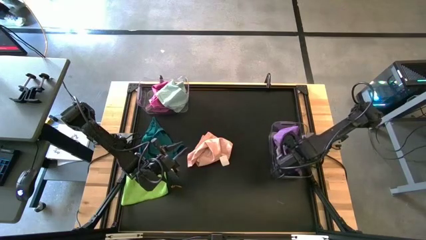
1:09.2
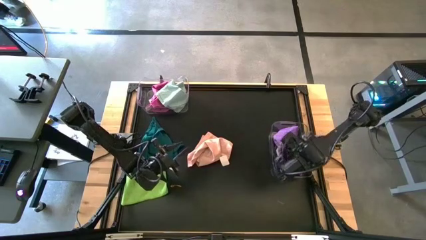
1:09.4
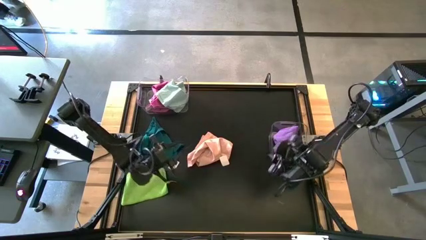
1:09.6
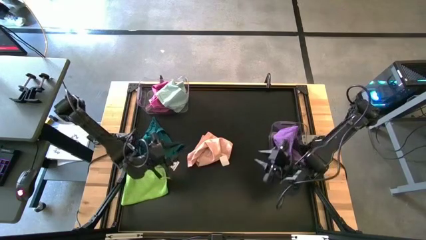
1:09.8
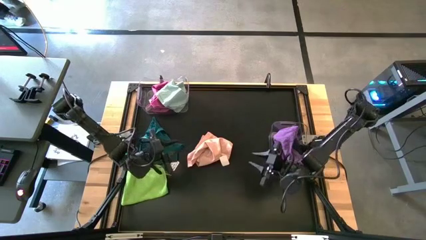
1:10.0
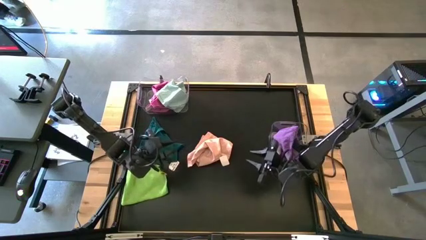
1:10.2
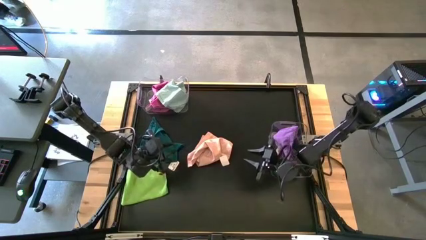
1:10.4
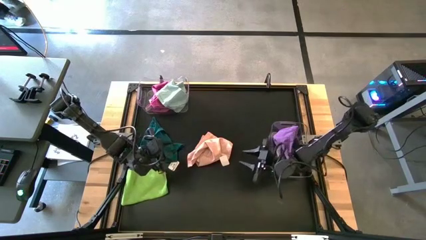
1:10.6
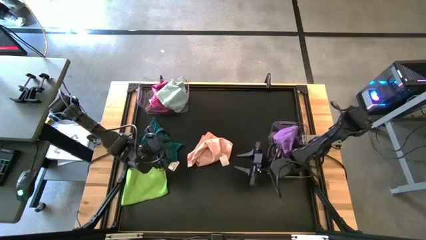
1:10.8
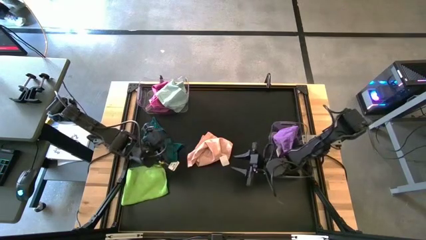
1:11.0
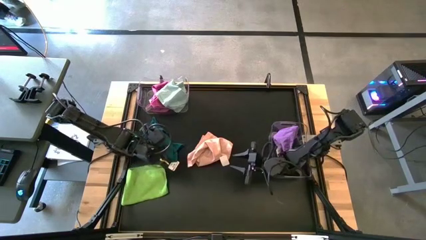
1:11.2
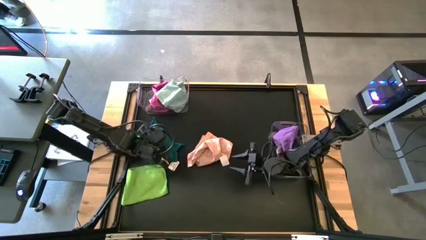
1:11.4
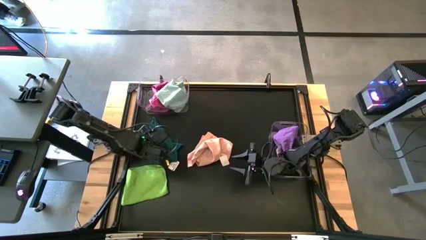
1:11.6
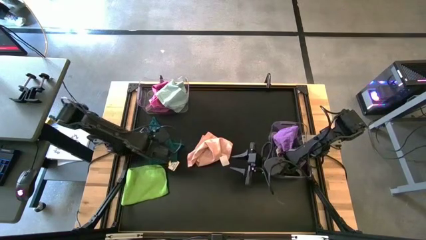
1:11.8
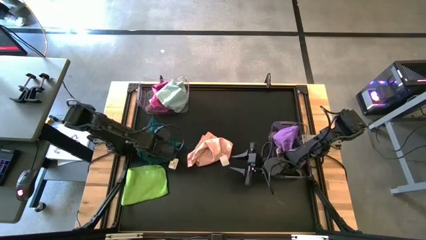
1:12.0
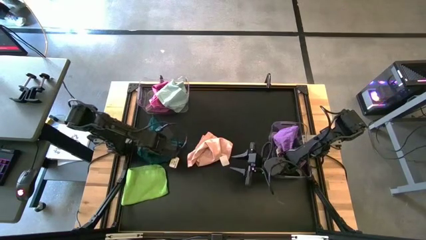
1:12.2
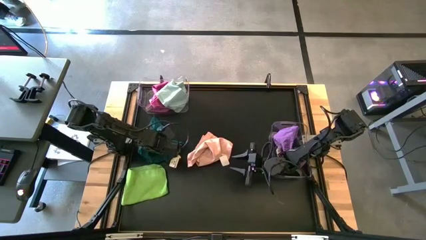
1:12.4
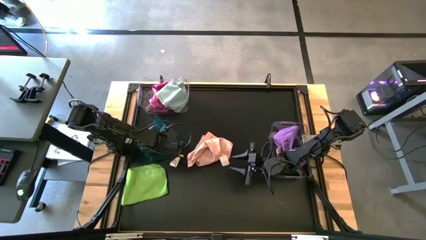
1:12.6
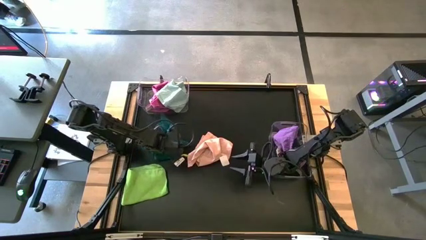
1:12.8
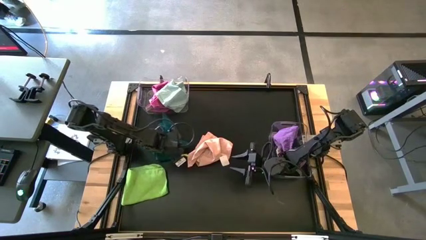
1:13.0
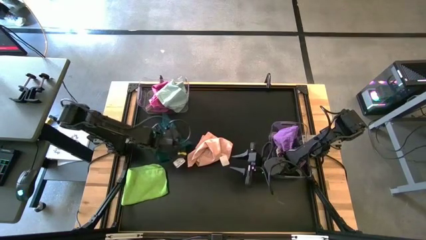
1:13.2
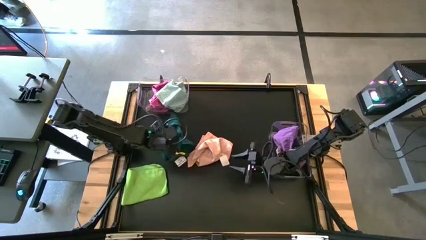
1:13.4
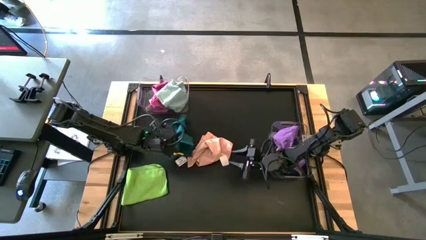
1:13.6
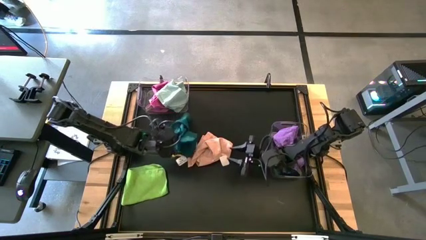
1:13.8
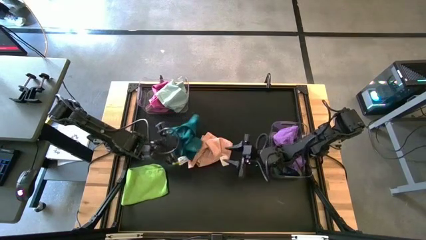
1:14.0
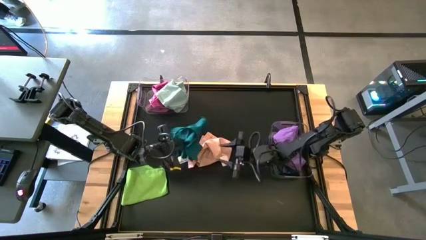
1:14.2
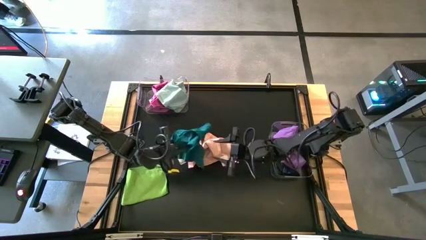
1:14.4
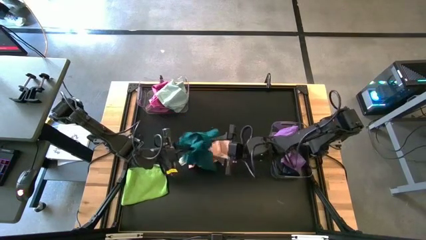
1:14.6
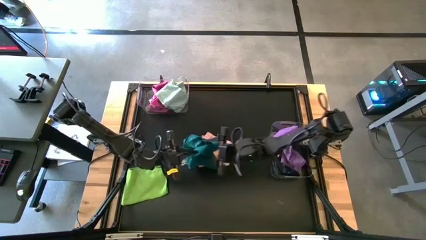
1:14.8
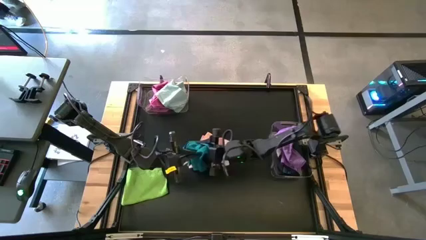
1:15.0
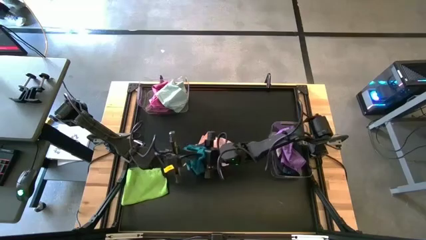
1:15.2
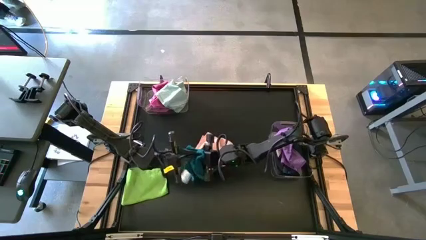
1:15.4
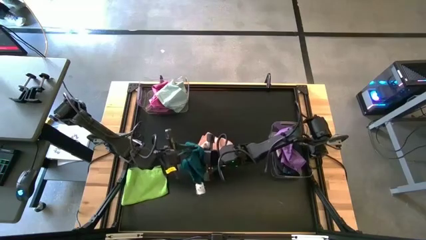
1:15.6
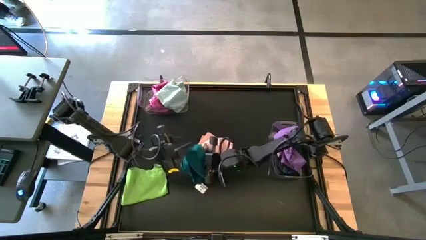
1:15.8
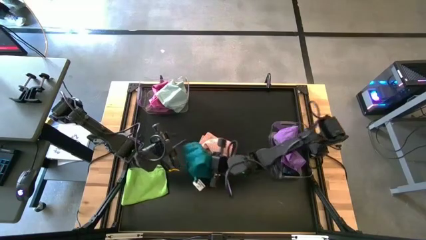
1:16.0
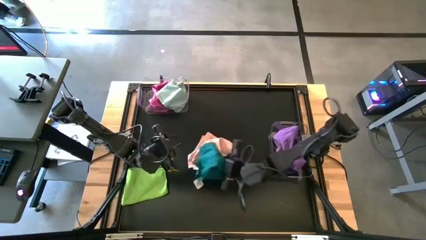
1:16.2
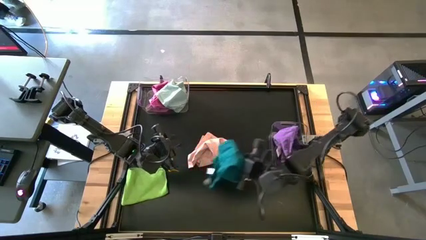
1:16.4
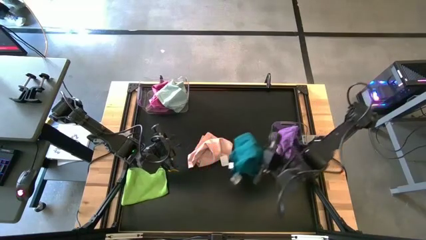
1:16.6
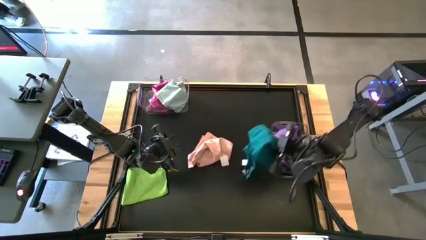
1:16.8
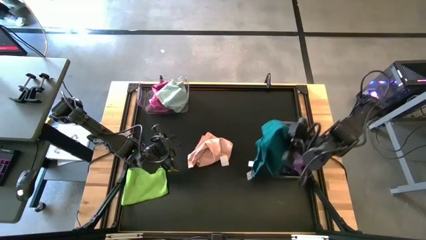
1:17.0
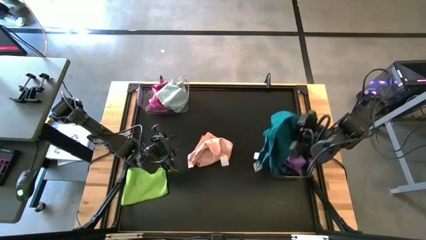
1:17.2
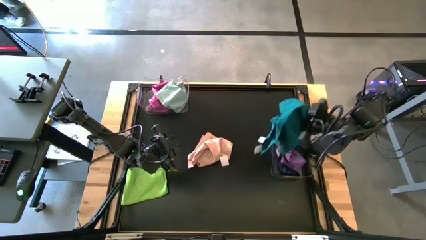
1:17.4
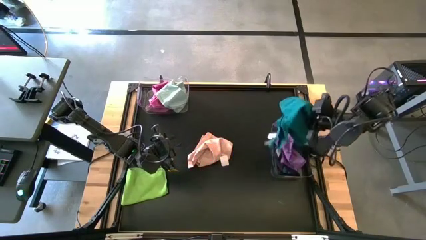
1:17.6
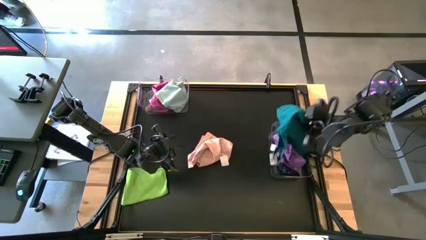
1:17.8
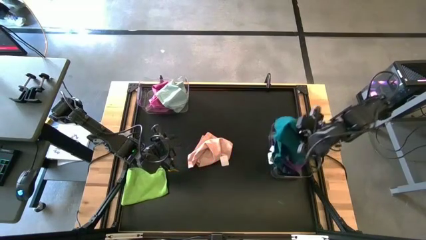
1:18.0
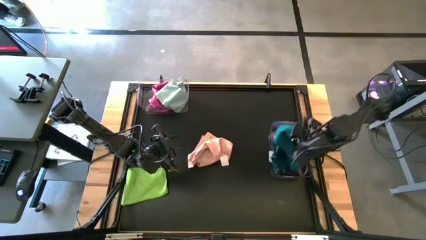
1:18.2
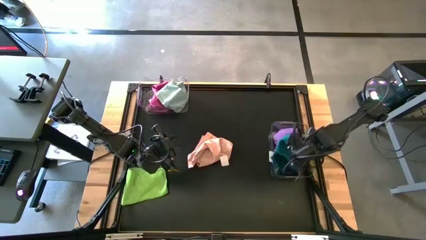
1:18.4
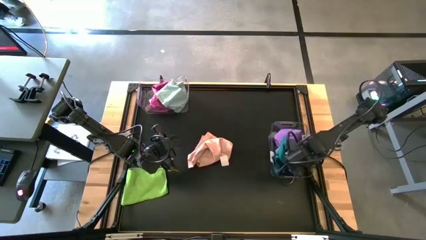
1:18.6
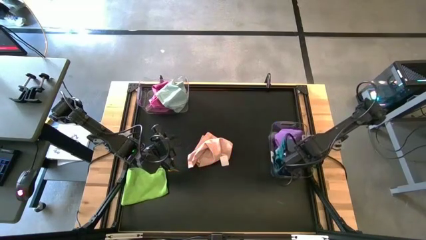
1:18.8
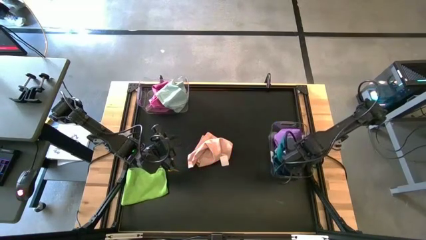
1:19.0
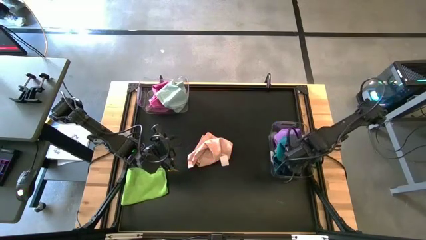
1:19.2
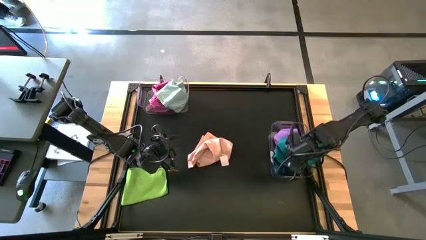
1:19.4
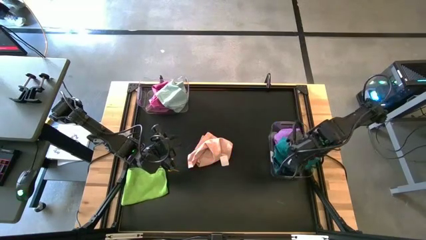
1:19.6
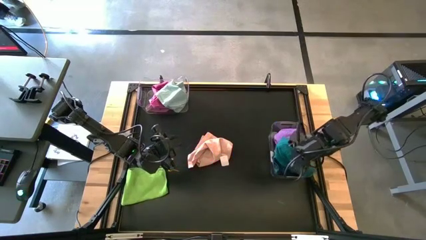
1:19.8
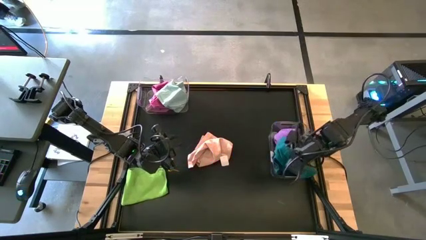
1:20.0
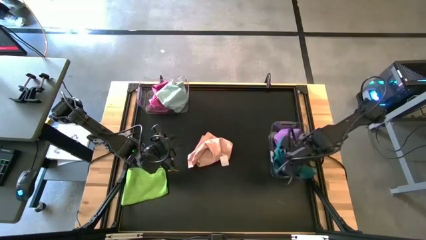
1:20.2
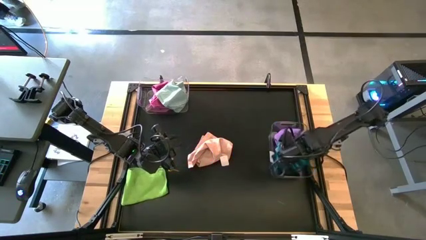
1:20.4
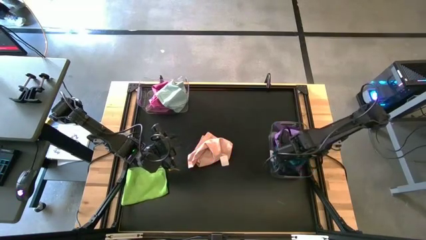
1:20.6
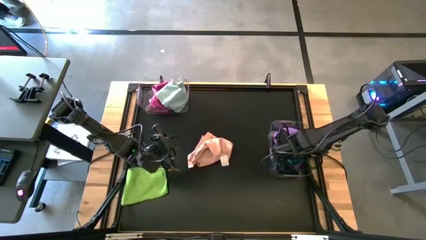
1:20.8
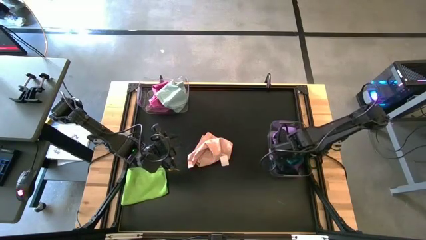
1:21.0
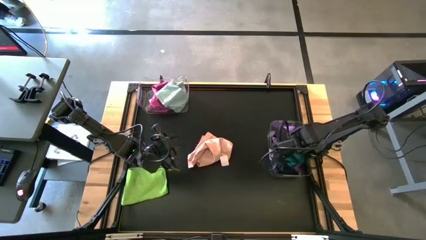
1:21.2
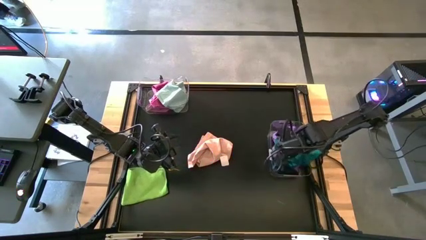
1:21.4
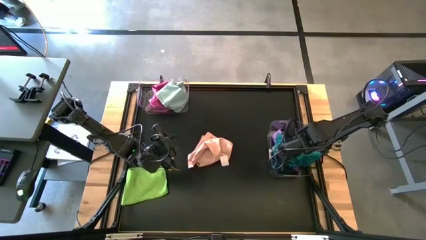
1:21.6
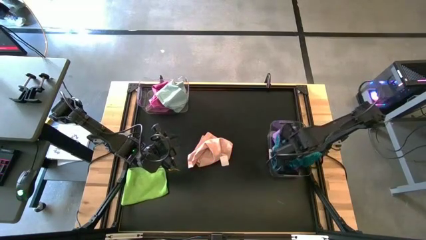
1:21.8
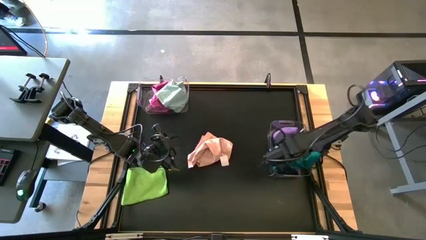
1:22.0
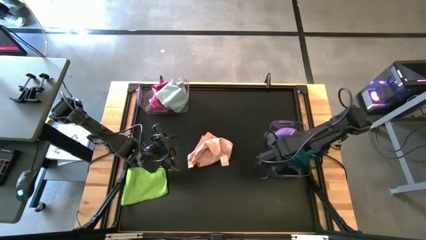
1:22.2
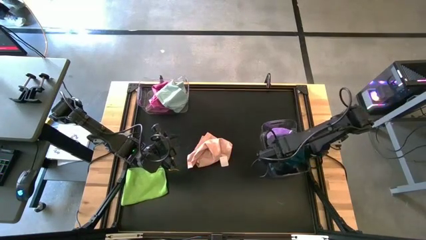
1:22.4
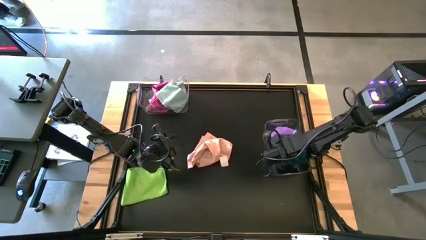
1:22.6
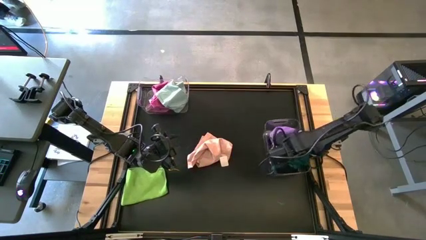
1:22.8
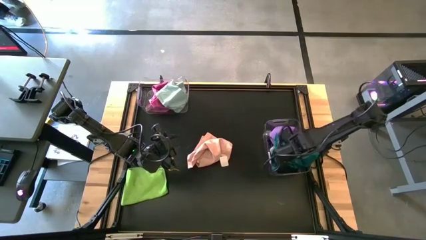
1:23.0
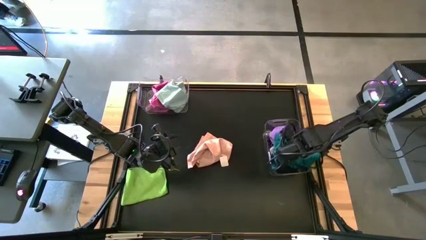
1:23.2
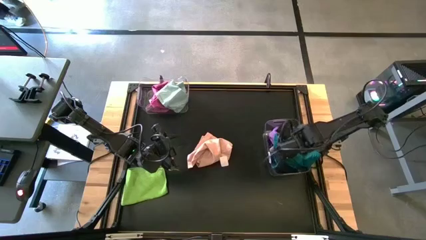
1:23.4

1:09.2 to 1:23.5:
Task: Sort towels by color in basket
Put the dark green towel into the bottom transparent bin

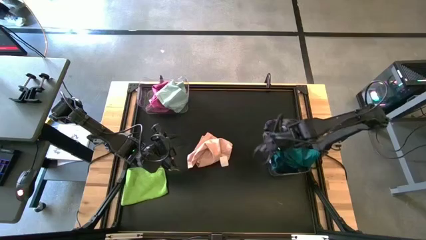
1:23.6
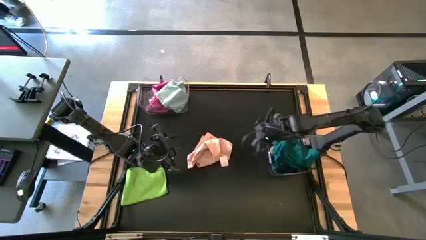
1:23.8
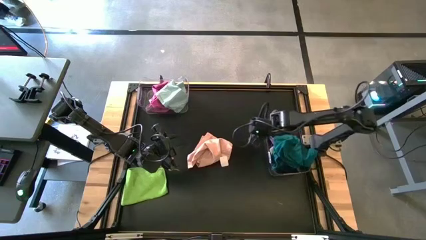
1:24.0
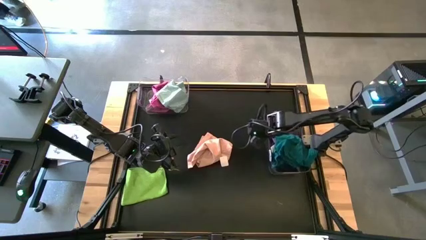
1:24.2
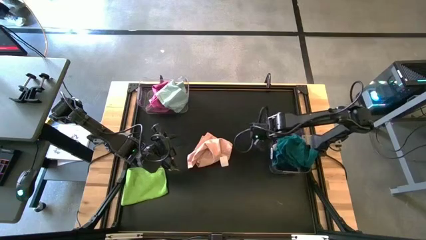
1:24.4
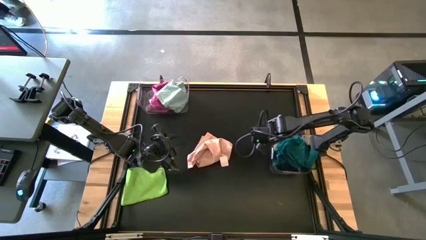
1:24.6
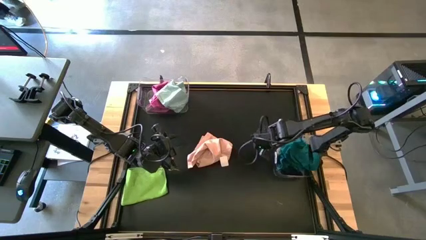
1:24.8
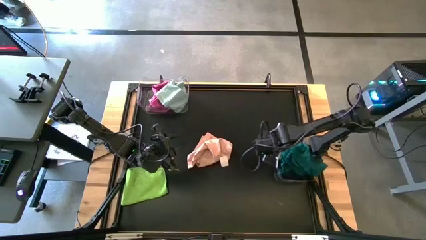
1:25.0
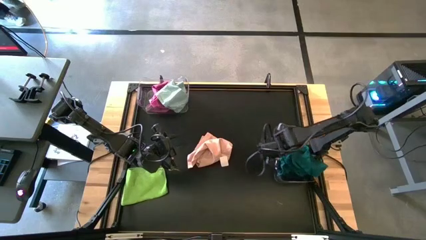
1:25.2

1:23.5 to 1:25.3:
Adjust the bottom transparent bin
